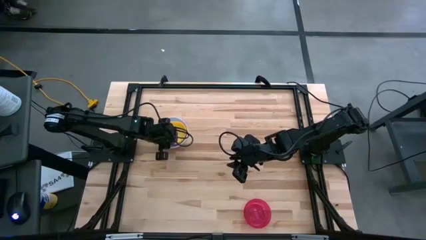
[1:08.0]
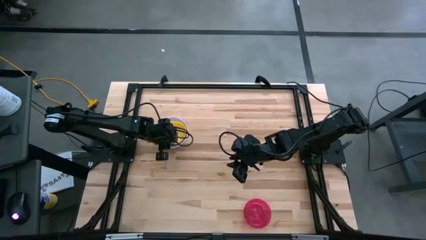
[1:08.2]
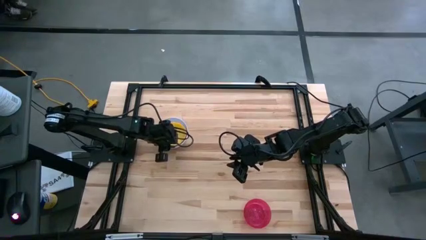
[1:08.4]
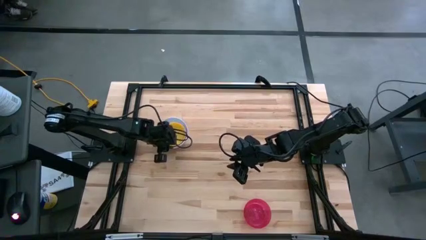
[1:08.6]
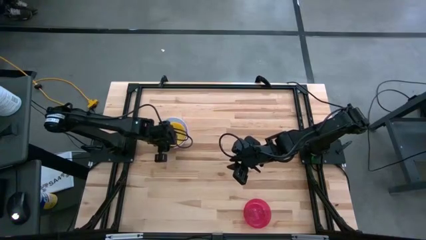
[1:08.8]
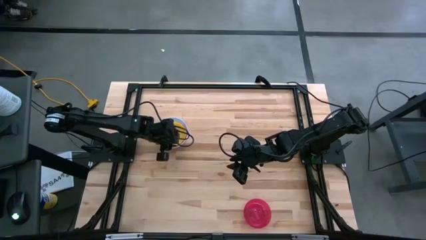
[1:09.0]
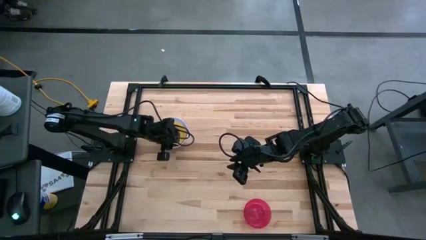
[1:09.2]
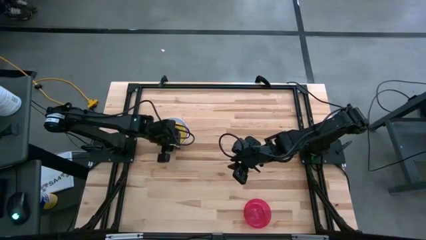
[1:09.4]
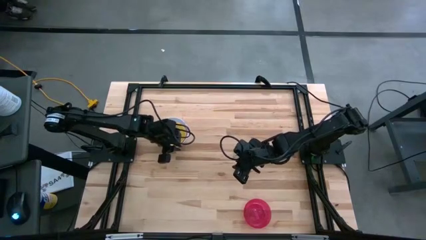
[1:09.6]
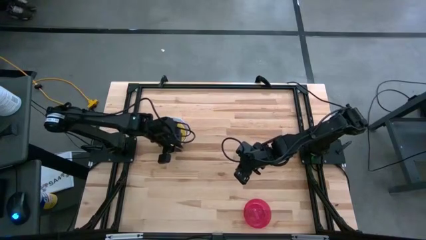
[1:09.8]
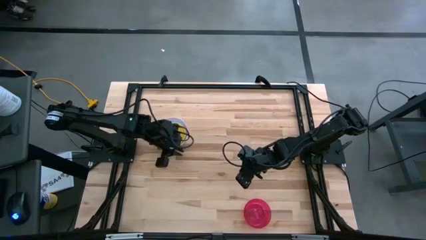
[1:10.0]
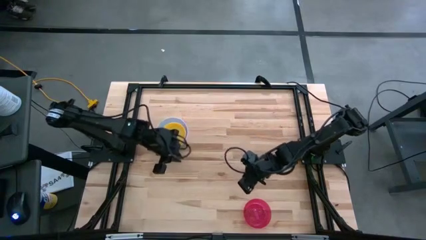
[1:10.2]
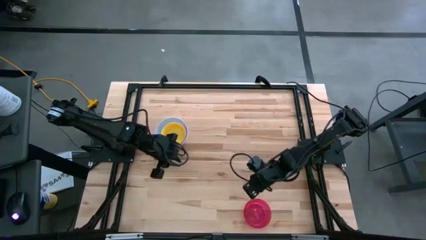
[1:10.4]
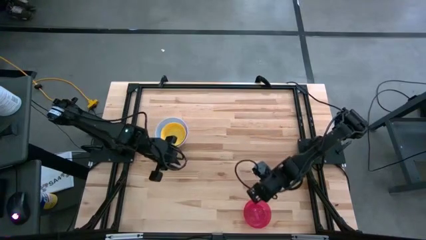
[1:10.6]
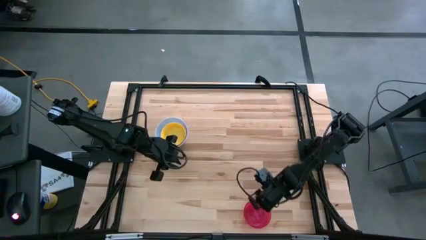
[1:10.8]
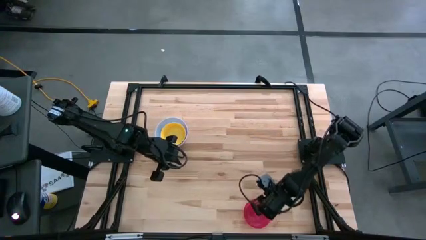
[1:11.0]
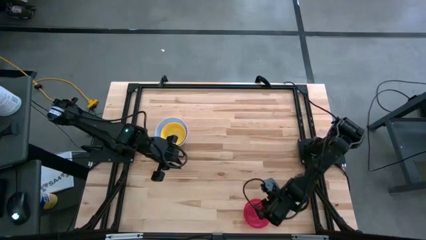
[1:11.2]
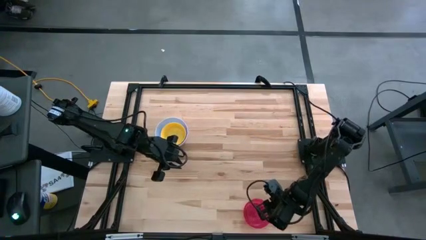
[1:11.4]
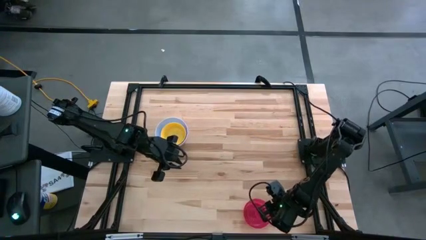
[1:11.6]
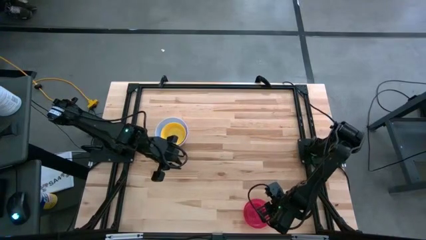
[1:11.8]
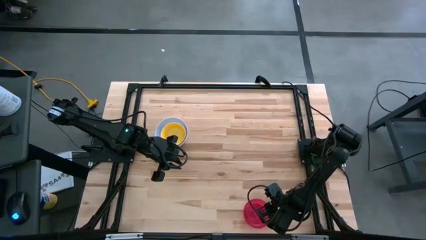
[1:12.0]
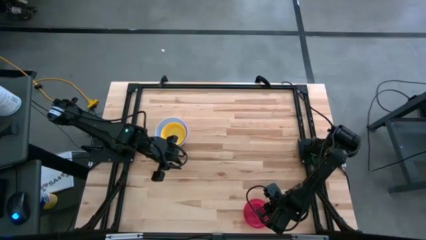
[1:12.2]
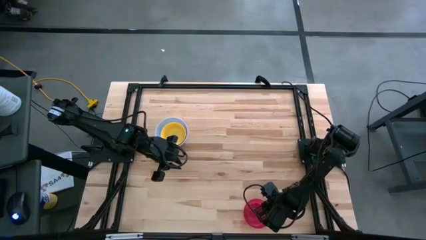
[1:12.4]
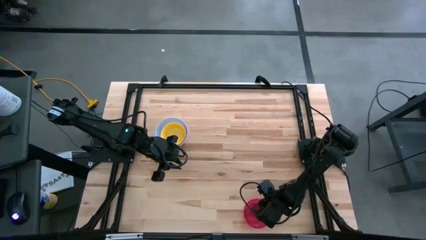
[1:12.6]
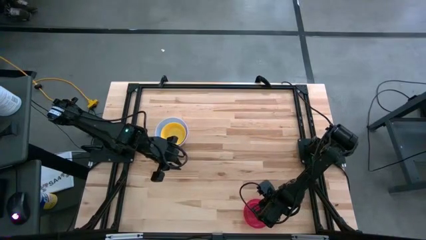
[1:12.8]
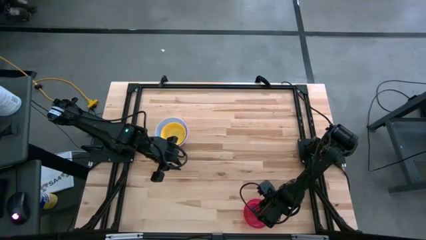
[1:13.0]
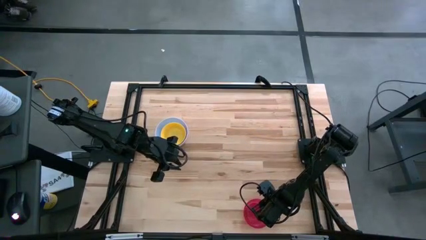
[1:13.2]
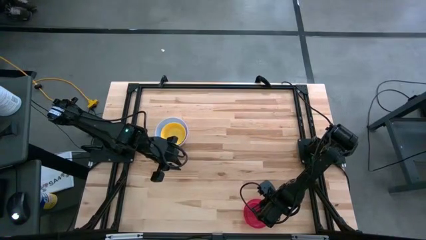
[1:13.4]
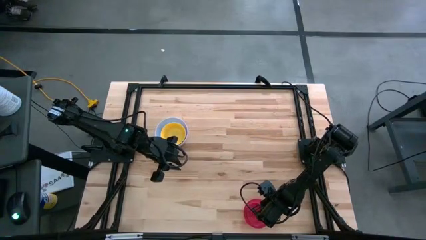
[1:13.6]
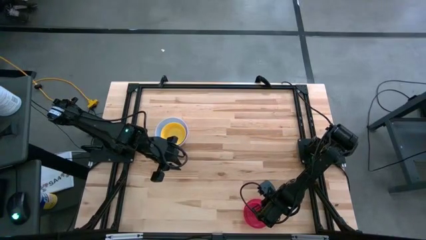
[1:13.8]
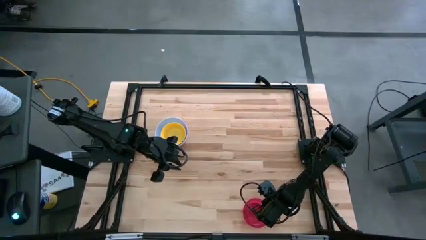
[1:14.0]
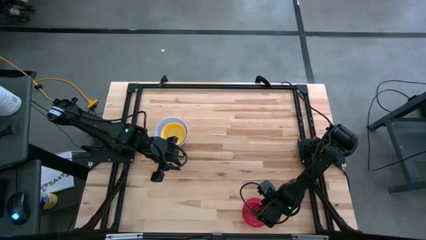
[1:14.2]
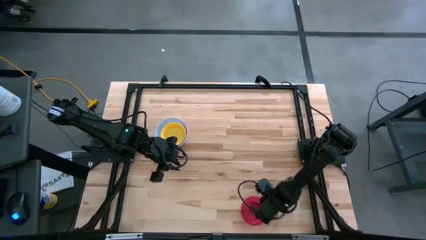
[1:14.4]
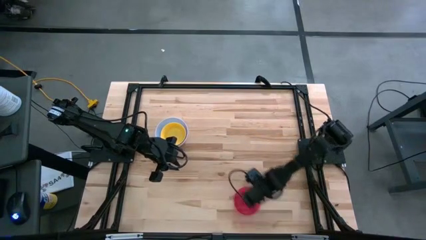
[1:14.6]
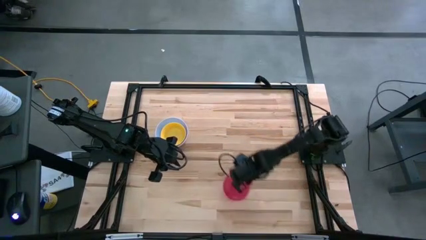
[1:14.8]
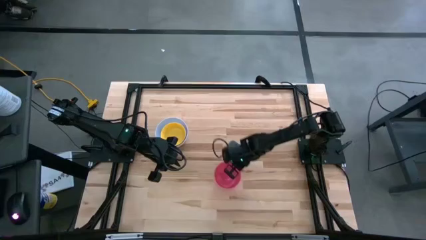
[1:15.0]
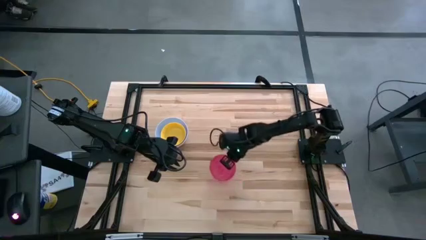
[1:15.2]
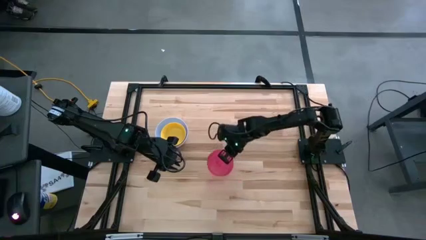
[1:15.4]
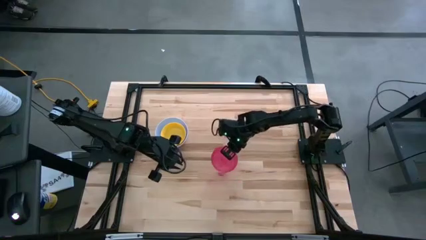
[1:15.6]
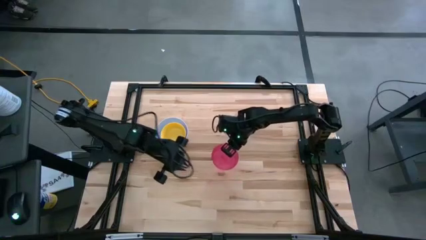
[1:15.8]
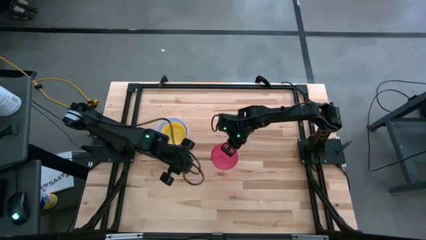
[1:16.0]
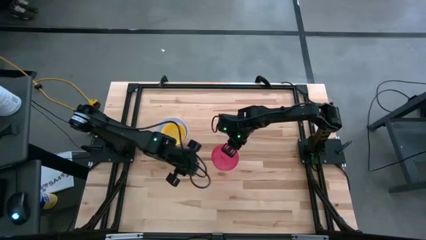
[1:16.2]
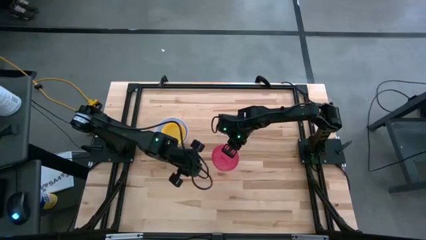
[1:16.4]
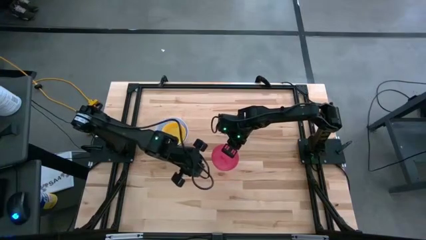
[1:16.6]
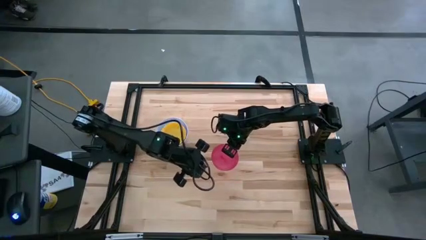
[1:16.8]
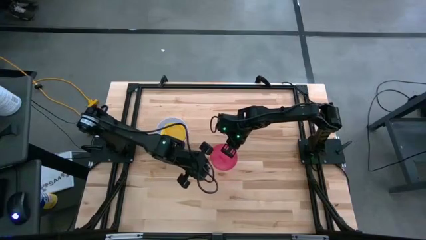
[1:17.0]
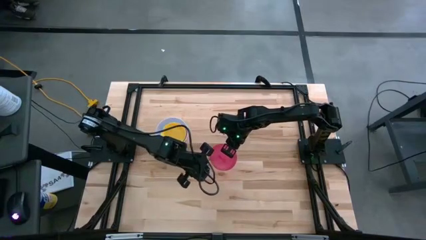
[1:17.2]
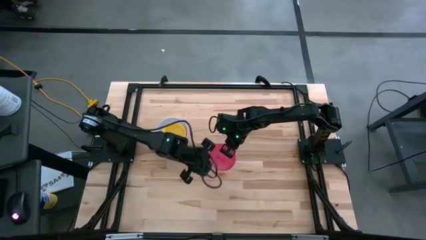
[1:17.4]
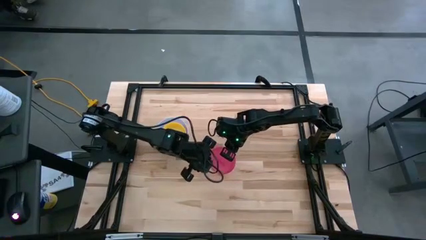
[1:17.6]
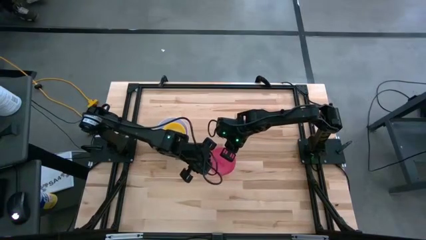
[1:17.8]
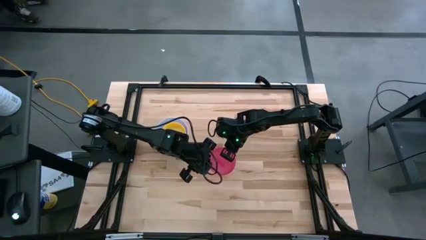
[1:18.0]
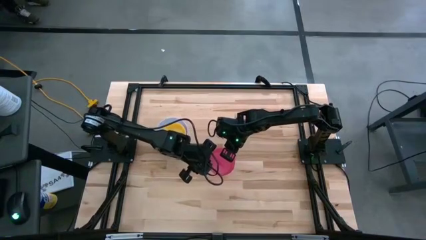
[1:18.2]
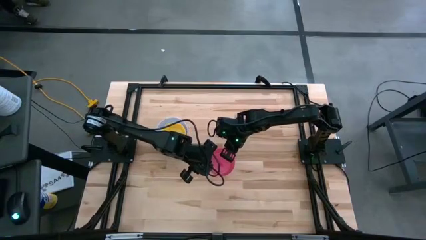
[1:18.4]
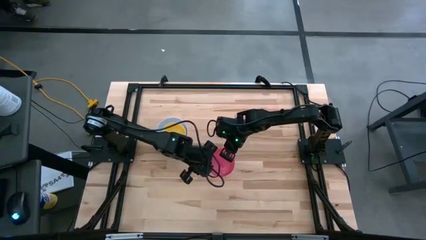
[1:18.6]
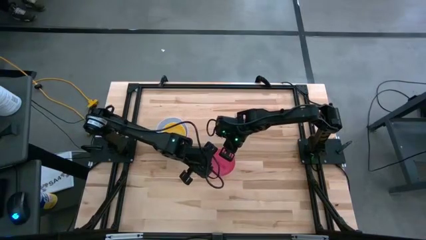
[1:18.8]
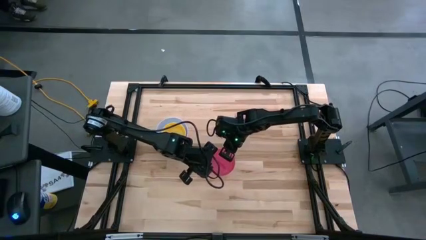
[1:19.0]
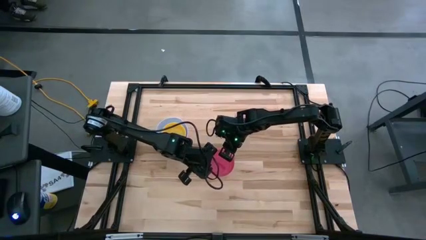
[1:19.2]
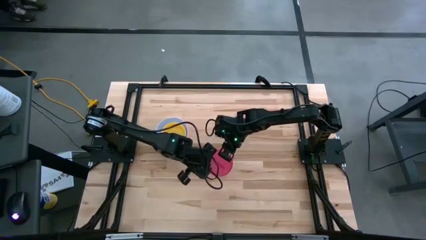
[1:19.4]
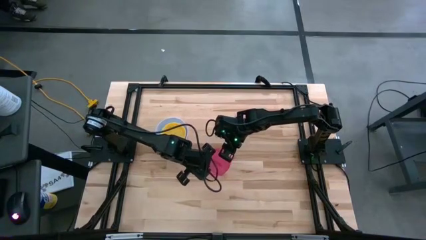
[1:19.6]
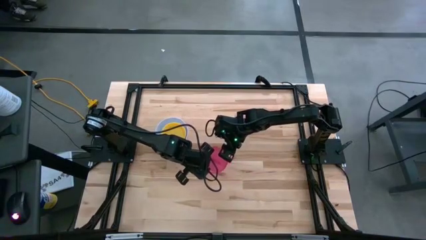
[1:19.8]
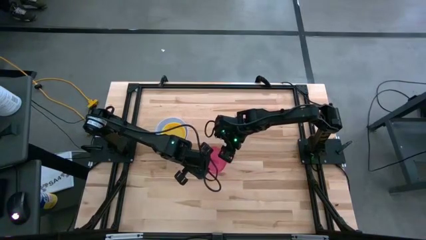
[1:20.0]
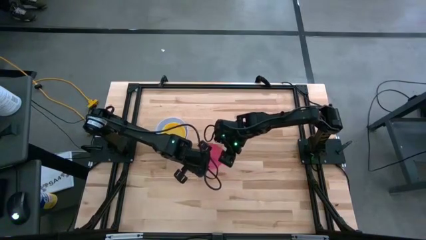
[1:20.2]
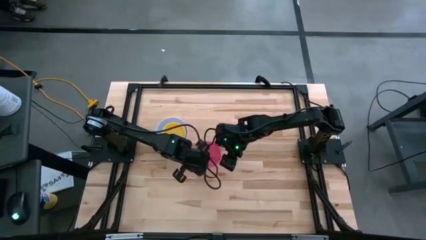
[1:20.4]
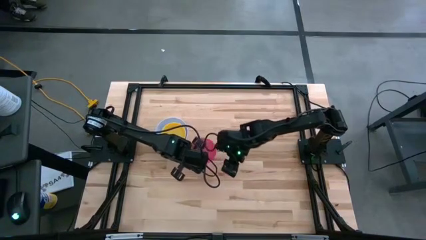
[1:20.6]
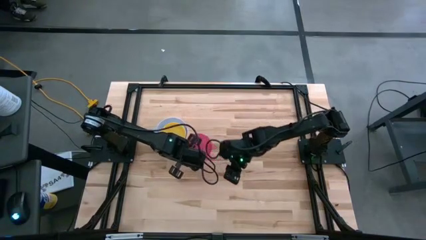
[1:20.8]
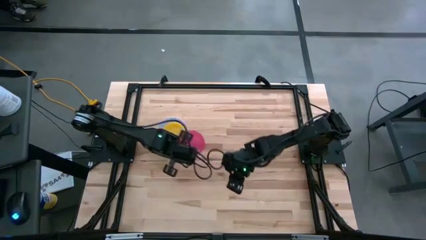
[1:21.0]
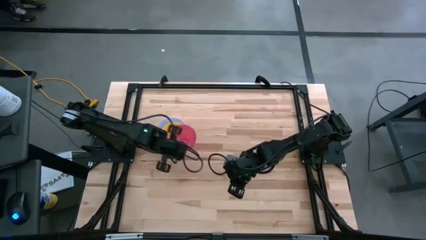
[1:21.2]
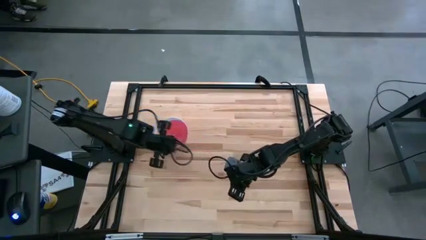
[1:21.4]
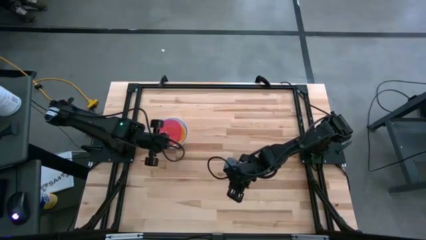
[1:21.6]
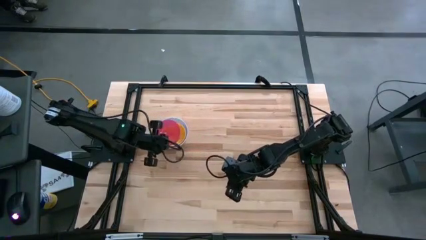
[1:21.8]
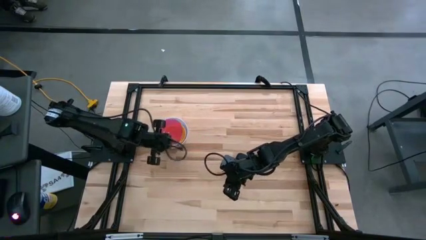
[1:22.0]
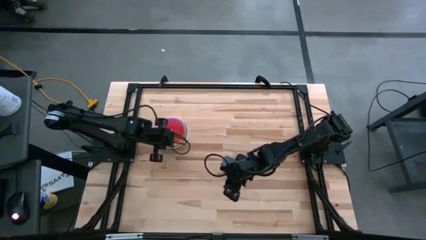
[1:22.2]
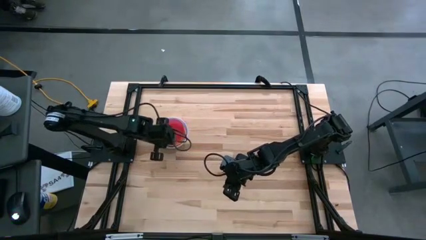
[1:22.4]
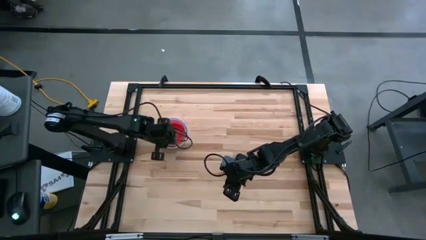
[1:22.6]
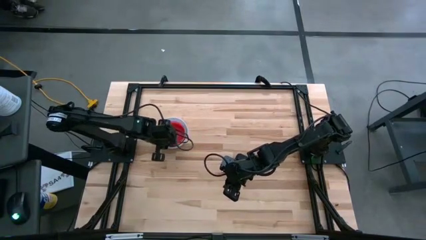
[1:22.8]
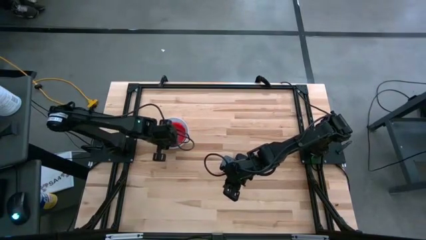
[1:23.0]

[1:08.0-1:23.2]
Stack the red bowl on the yellow bowl
